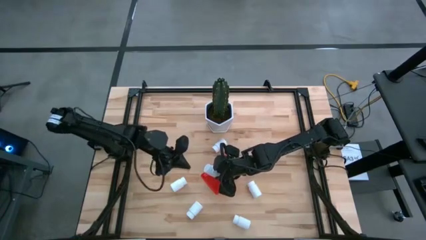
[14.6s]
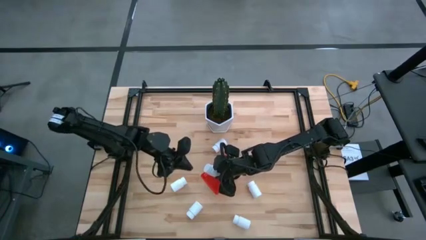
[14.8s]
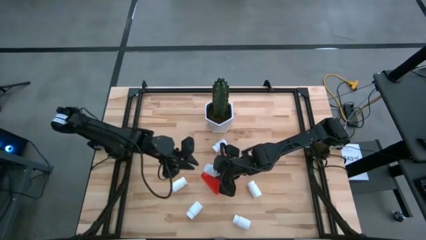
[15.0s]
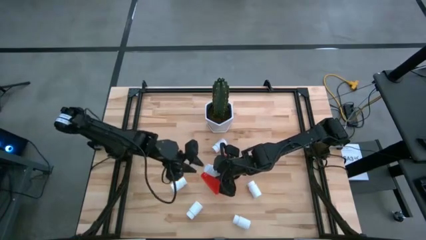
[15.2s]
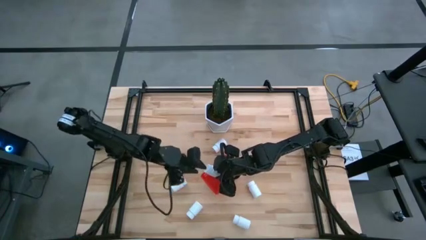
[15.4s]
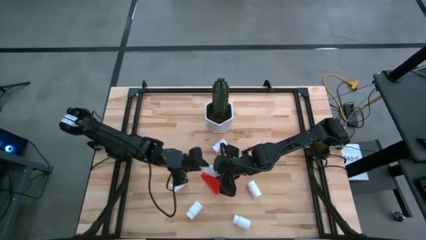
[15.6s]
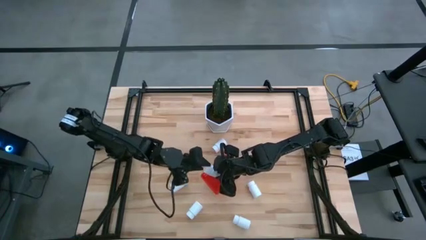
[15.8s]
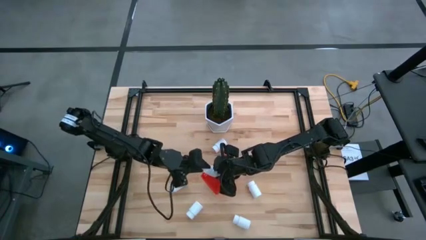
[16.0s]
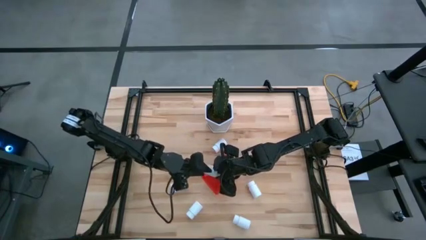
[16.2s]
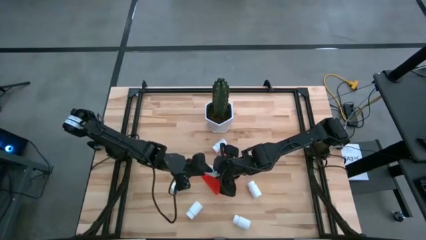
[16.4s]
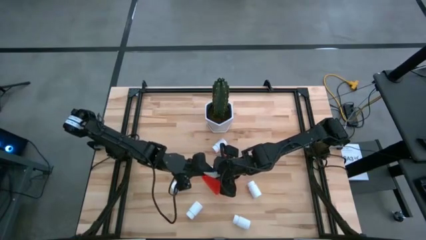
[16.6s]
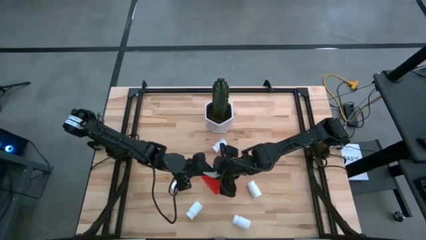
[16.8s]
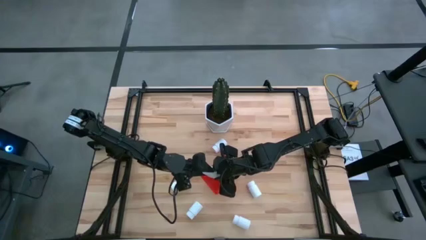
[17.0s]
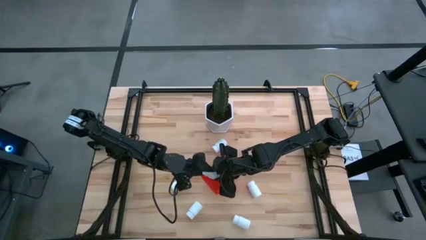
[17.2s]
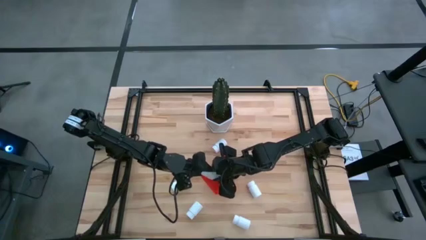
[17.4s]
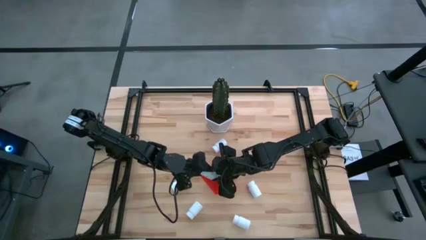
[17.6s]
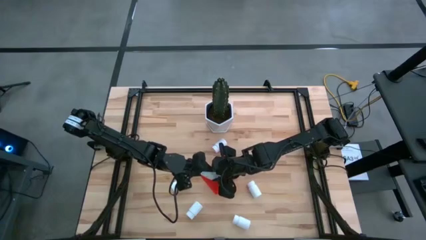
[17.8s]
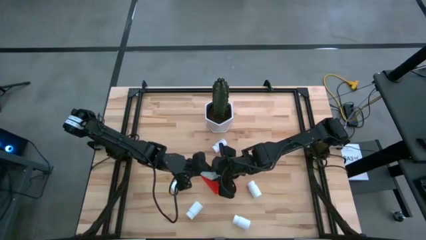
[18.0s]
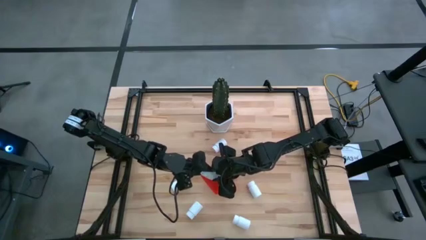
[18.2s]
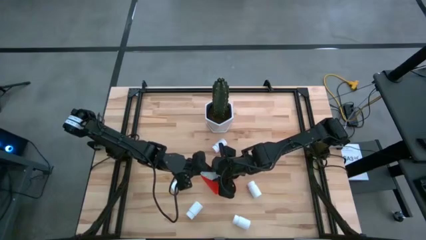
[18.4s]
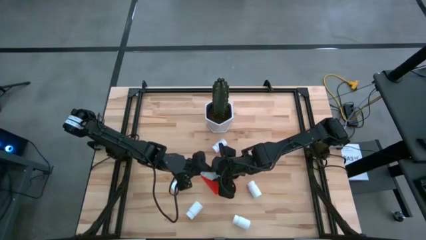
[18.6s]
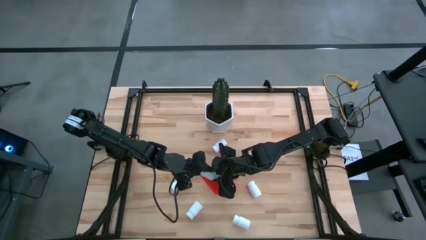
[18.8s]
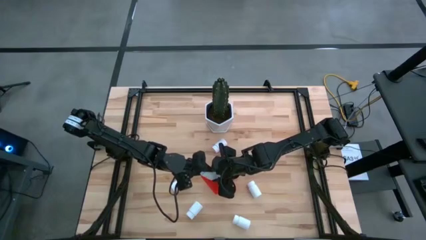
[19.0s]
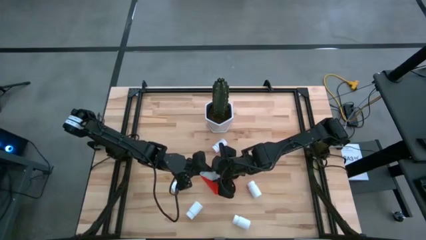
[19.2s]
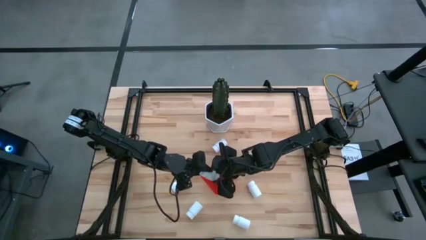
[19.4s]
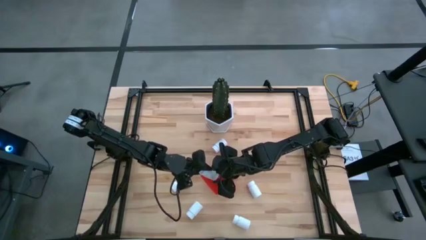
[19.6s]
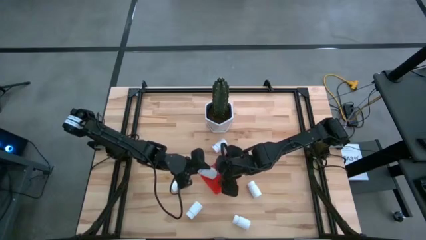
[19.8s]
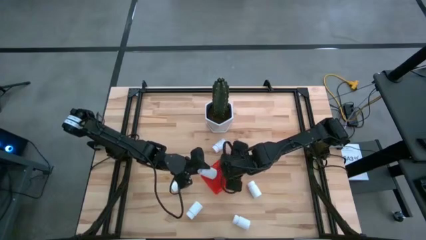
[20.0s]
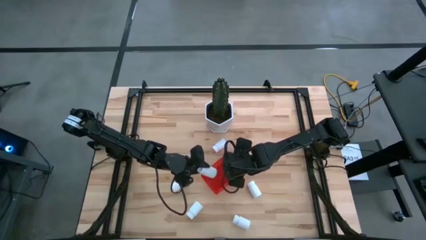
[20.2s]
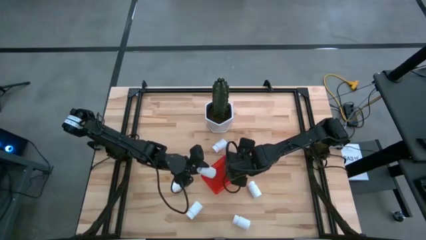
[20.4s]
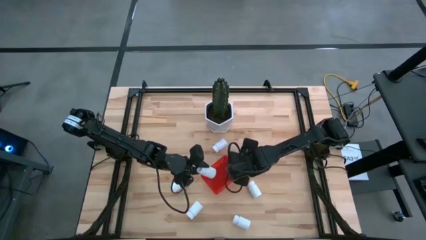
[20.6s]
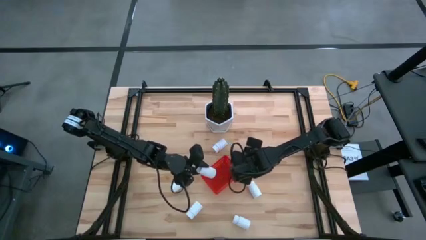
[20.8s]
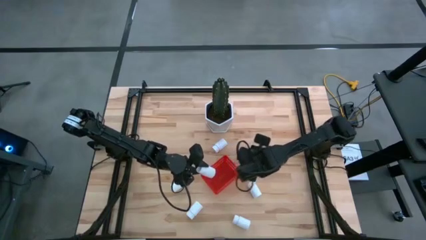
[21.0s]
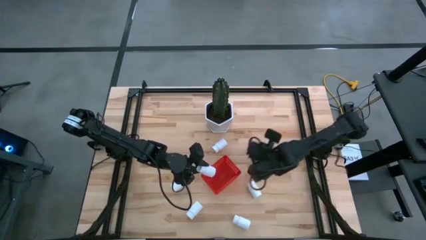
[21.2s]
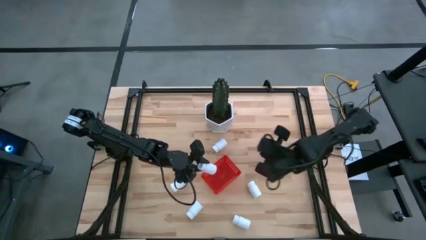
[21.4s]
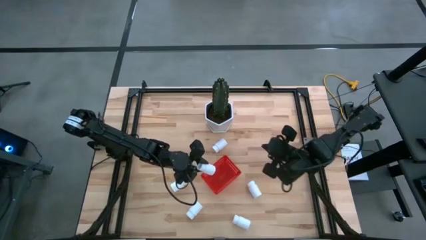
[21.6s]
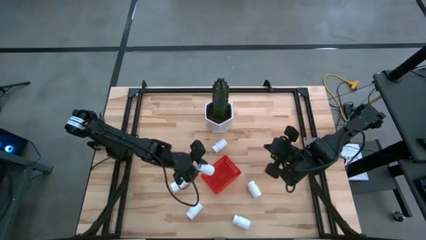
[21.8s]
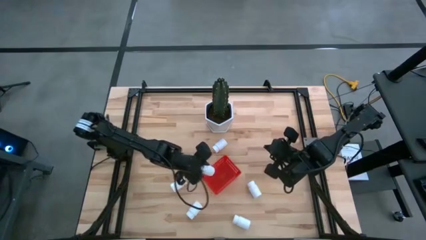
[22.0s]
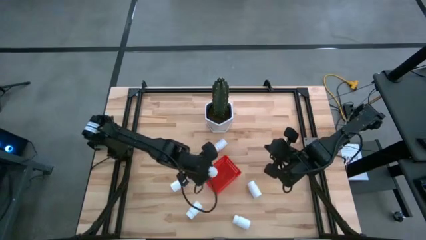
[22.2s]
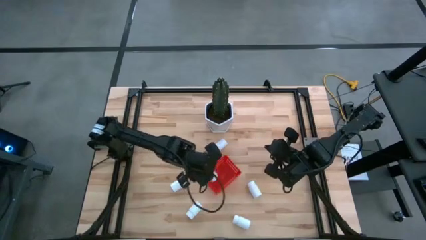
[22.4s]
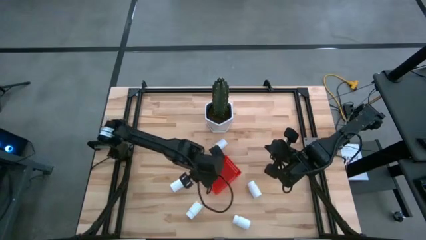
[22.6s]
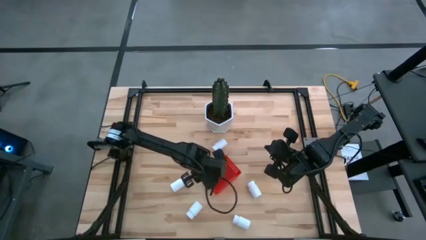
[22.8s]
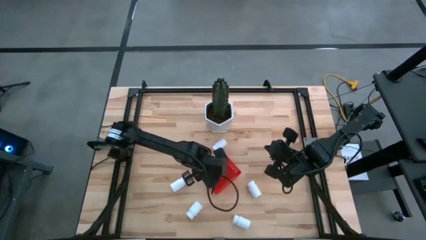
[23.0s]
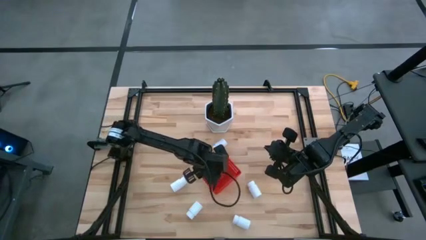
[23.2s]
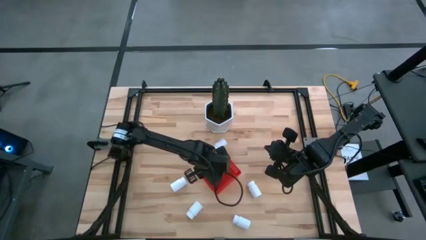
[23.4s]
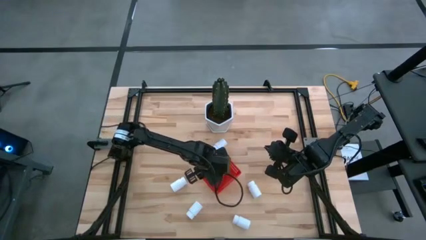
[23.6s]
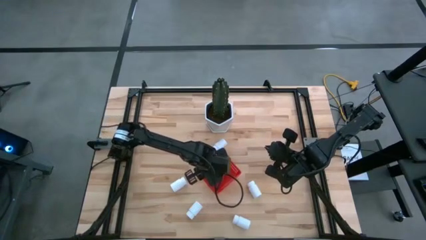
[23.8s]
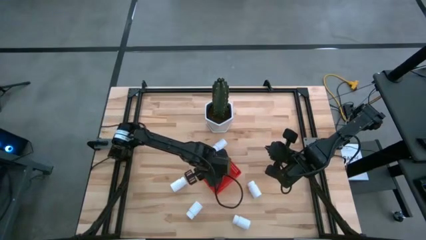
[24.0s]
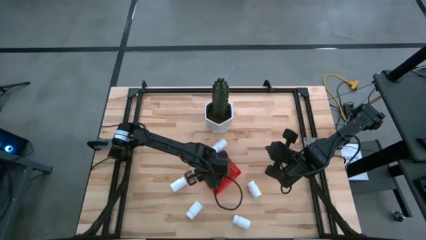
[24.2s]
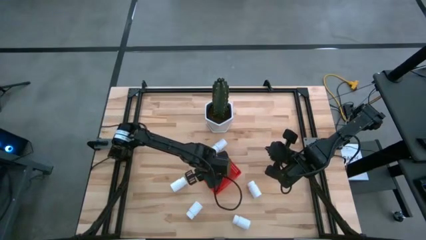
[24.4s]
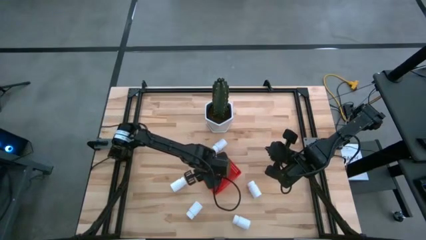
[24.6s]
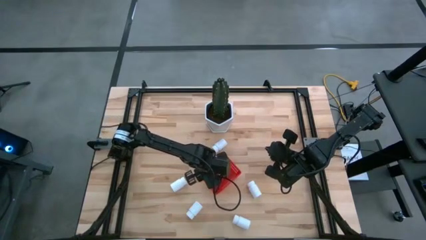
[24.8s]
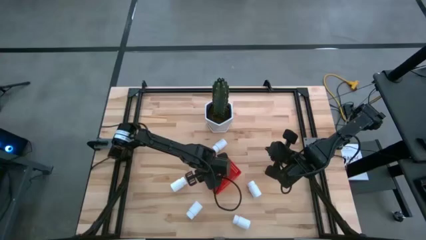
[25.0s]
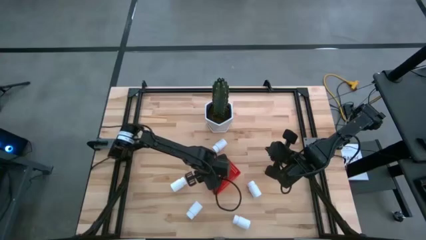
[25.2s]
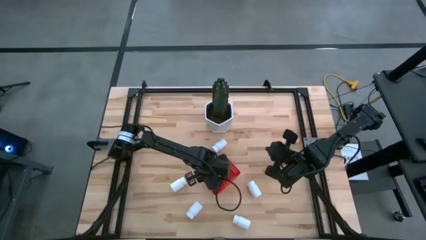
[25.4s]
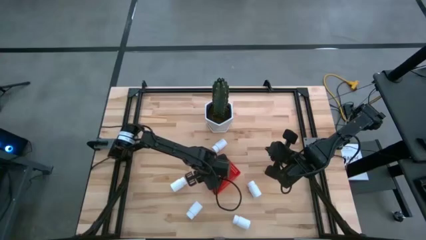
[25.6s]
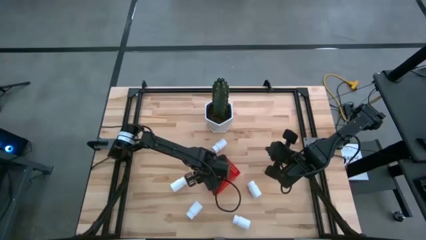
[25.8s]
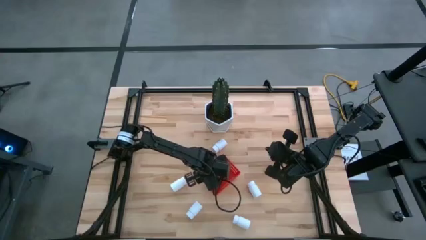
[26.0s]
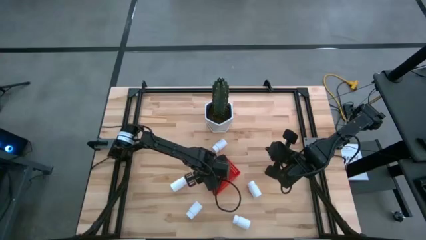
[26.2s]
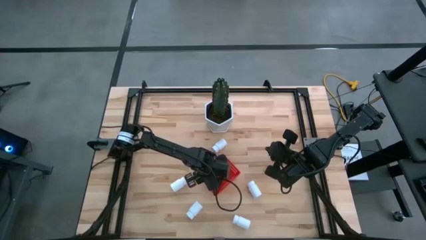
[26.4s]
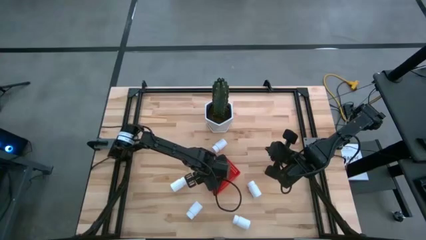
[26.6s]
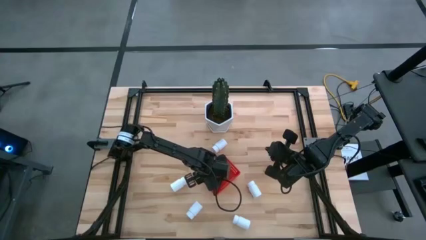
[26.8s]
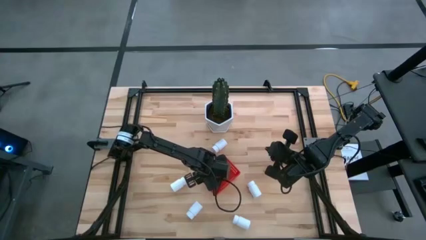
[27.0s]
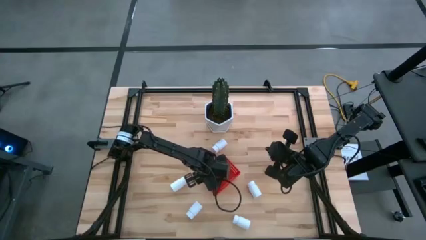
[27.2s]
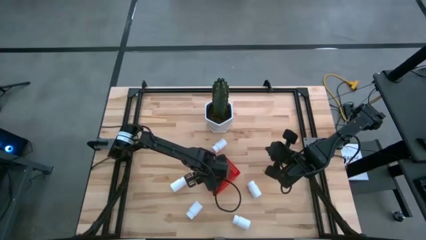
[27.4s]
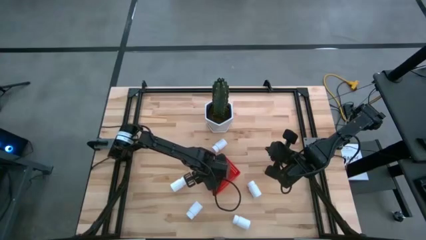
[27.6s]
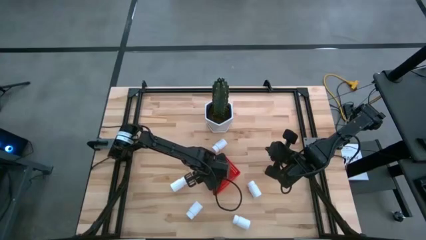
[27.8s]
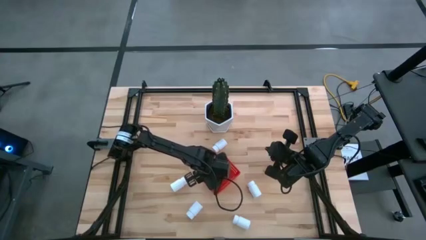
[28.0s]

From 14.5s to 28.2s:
Task: Pick and place pill bottles into a basket
Put the white pill bottle into the red bin
